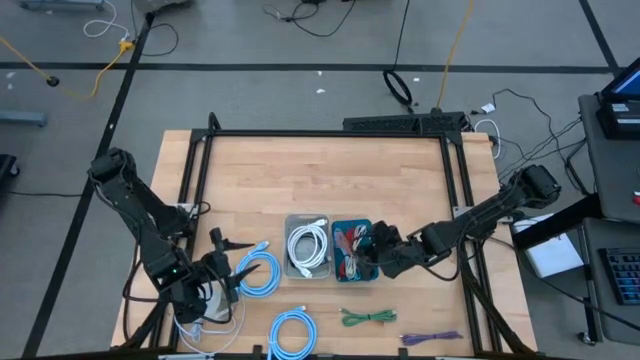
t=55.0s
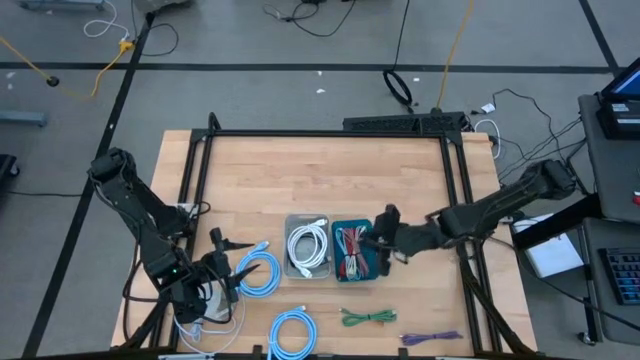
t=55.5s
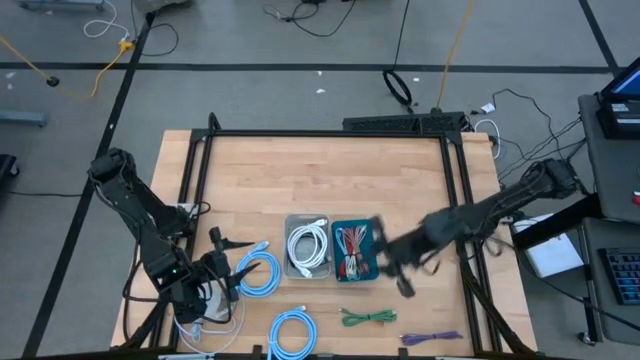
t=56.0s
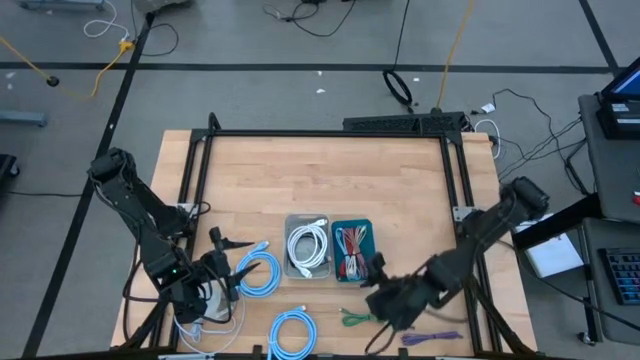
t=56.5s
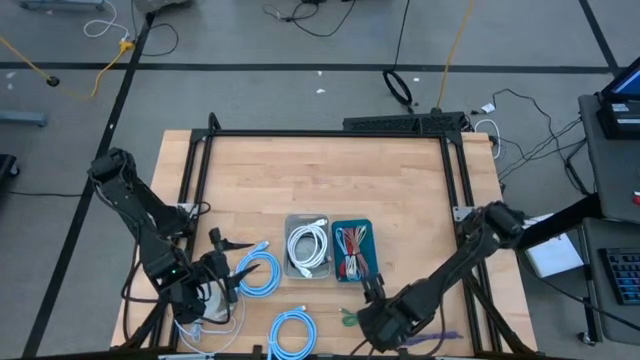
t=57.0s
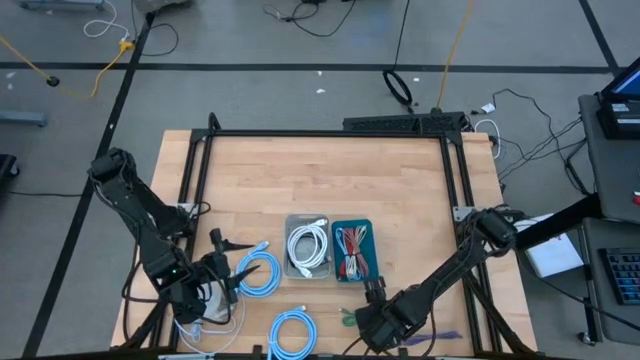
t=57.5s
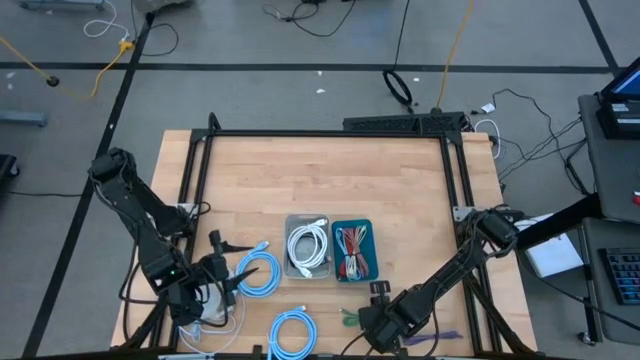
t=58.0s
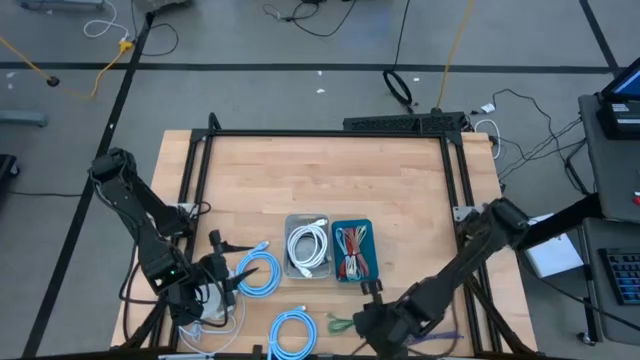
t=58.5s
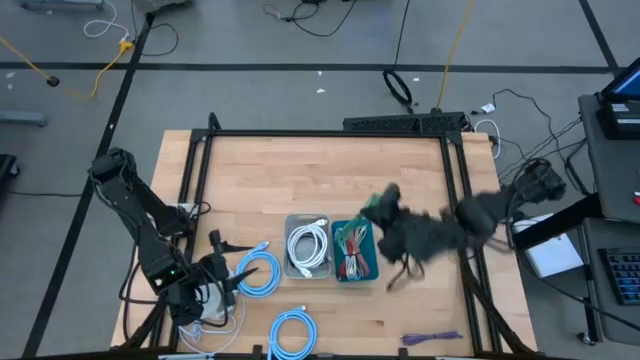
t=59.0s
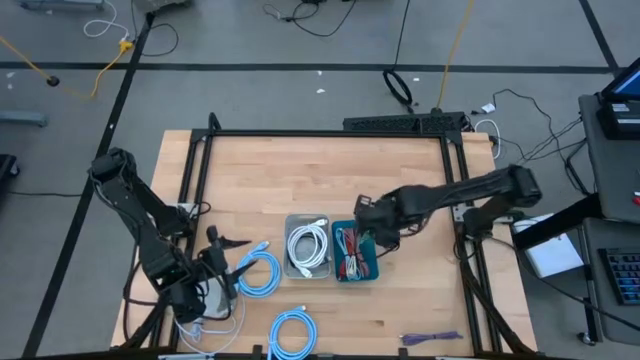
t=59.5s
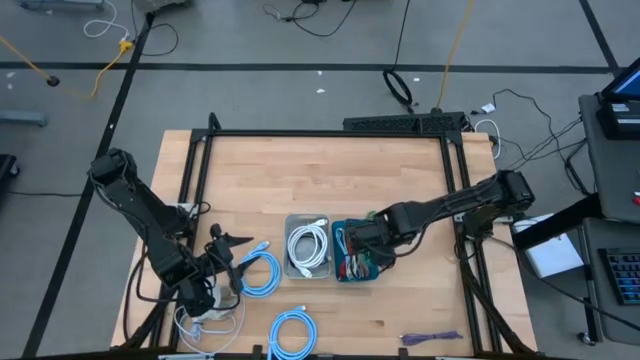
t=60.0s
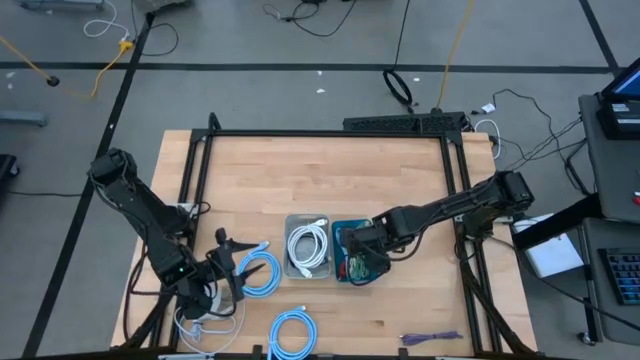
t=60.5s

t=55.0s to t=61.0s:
Task: Pick & Place USB Port
Put the green charger cable into the blue bin

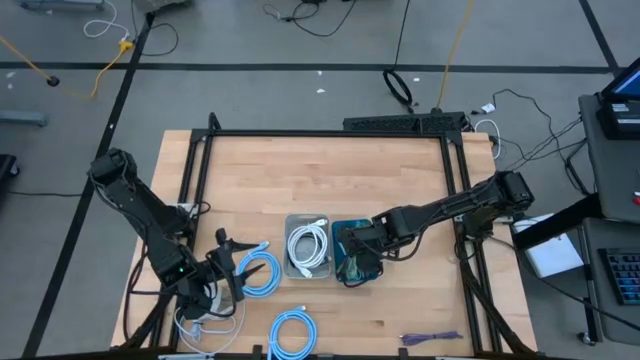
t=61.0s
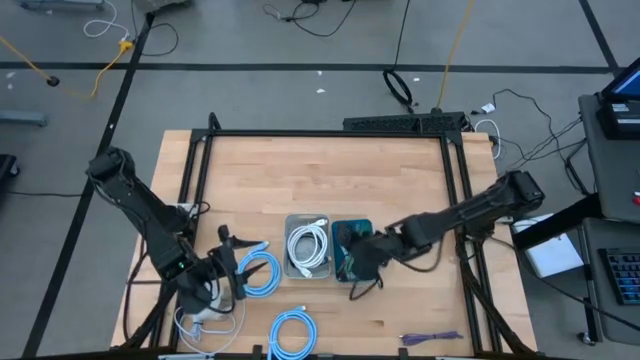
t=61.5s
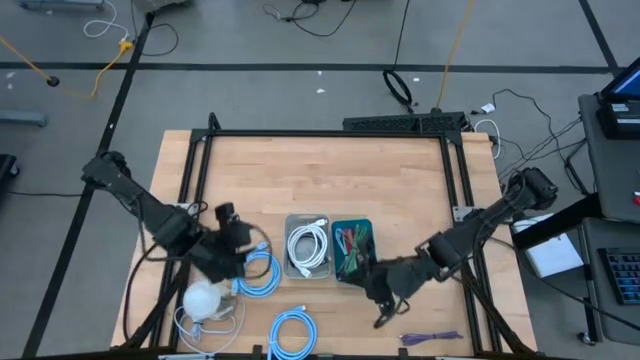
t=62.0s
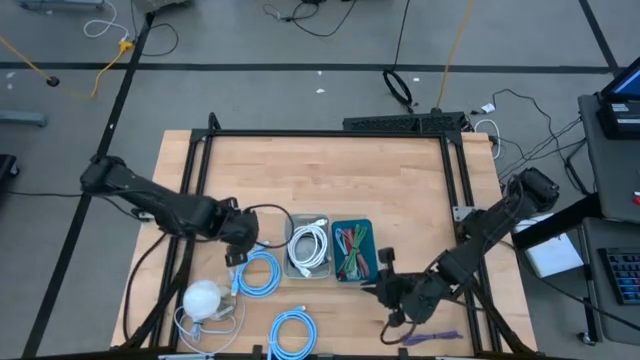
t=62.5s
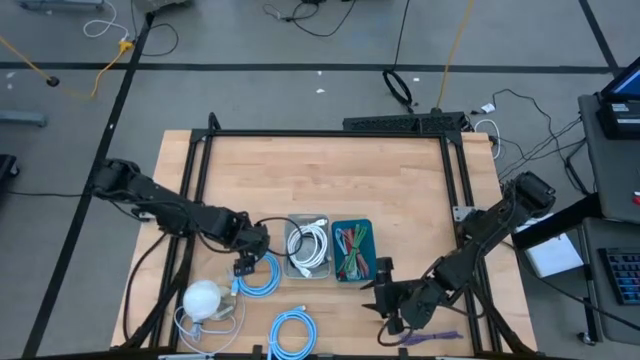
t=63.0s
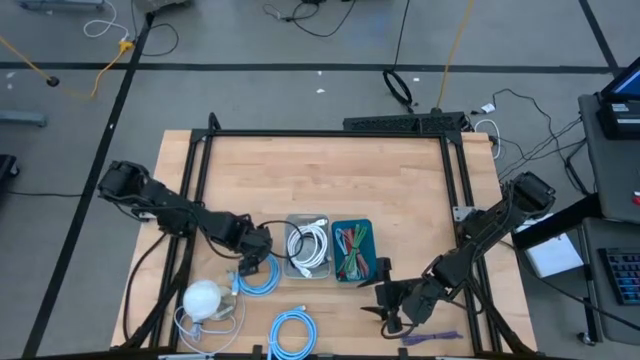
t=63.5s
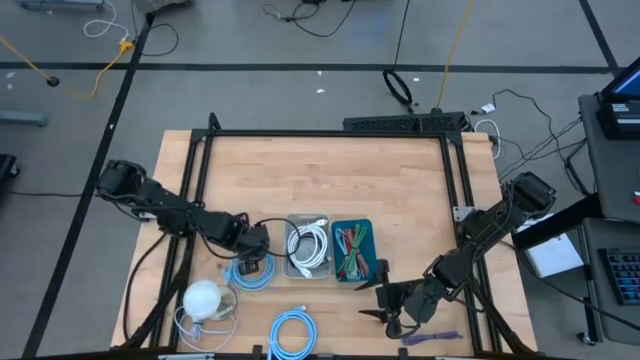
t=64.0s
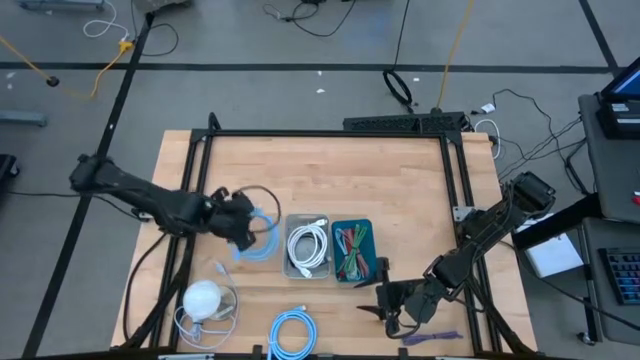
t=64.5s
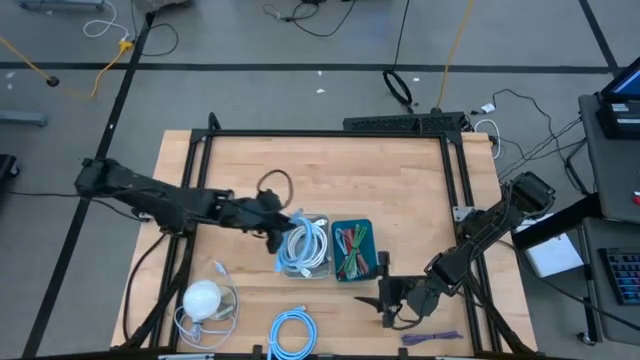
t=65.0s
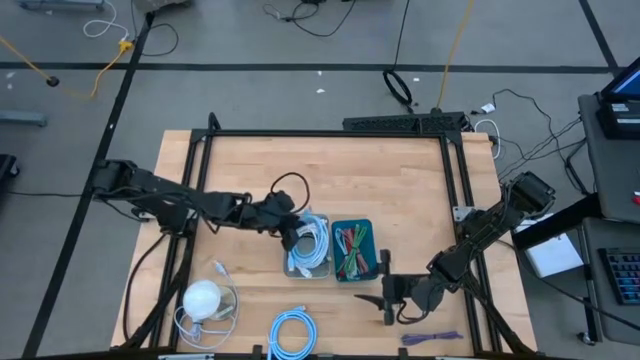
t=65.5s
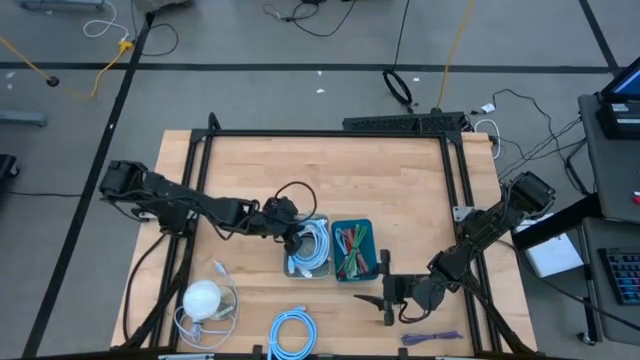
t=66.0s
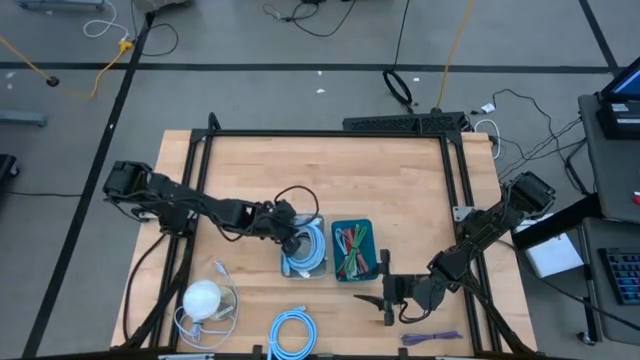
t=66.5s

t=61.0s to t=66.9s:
Put the top blue display cable into the gray bin

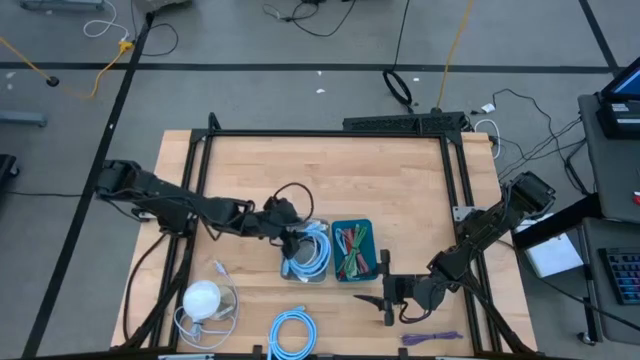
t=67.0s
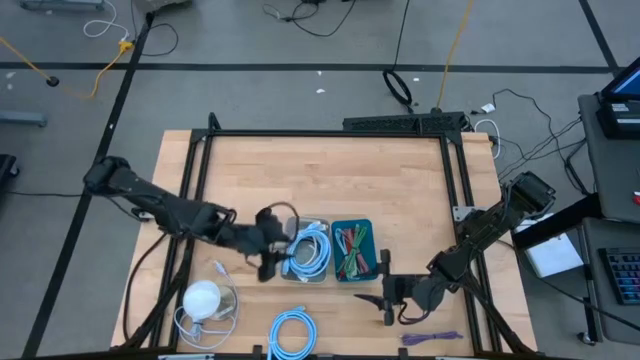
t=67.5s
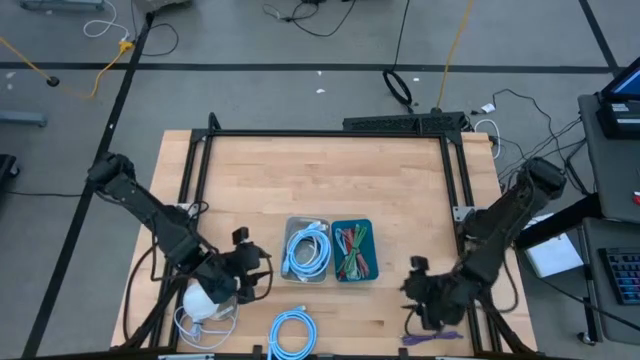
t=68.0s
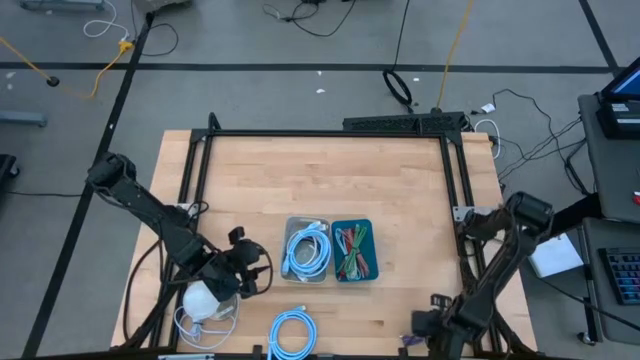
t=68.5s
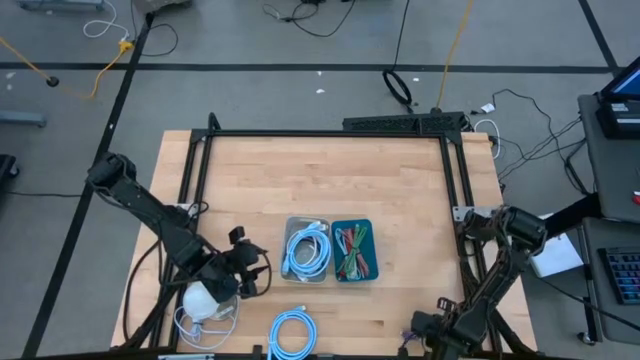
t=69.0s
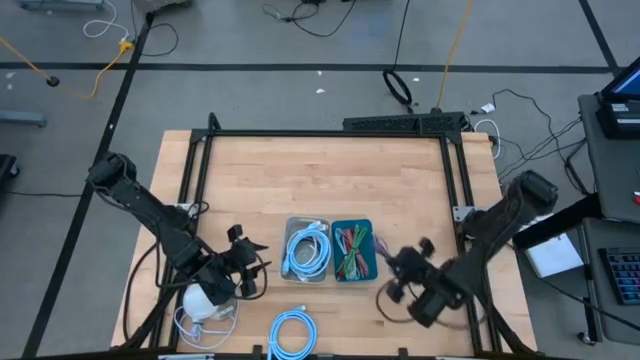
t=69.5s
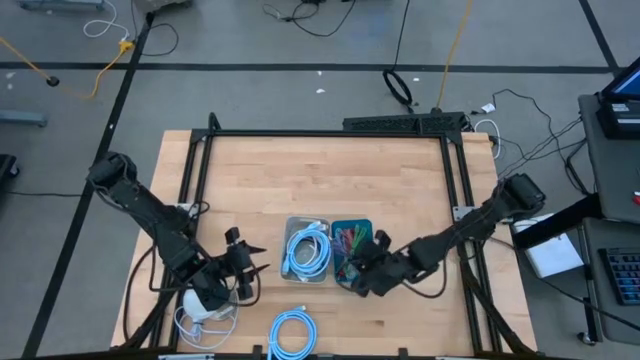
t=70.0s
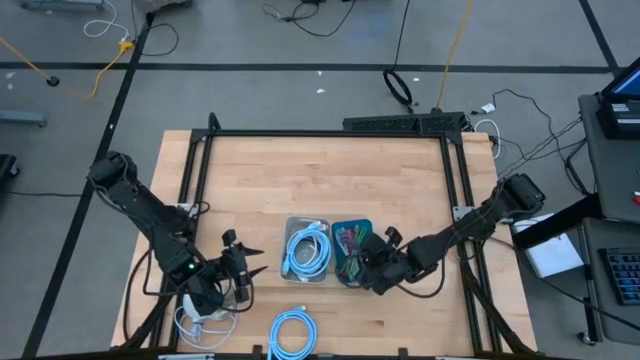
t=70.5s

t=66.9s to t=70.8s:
Put the purple charger cable into the blue bin

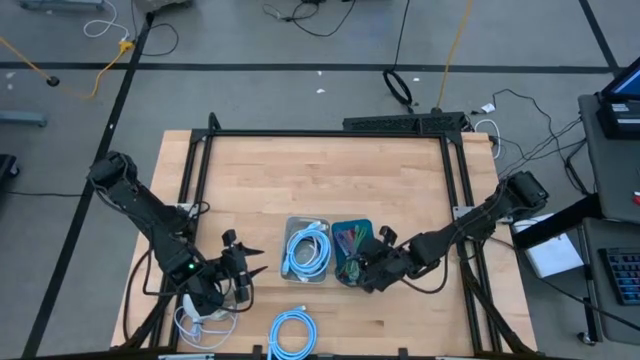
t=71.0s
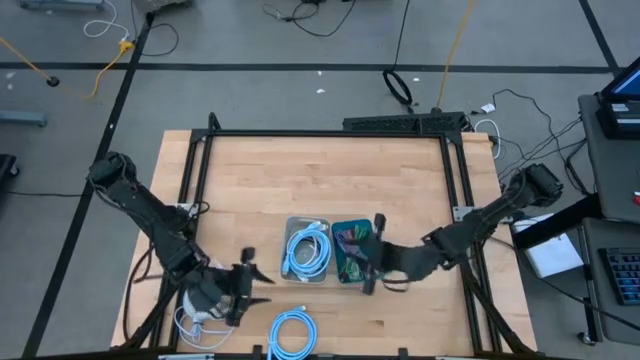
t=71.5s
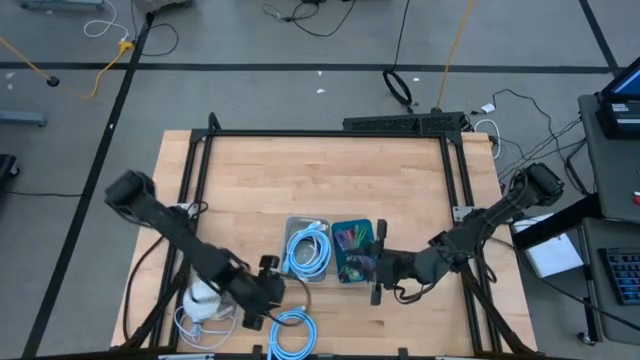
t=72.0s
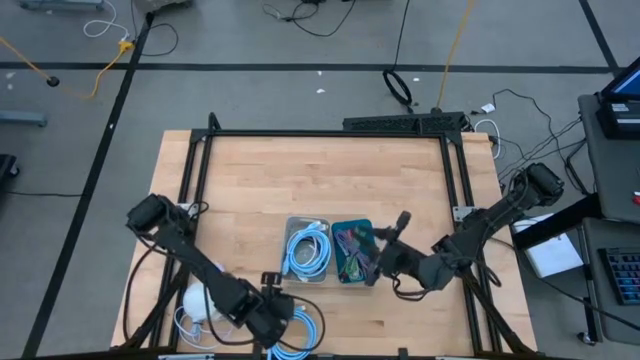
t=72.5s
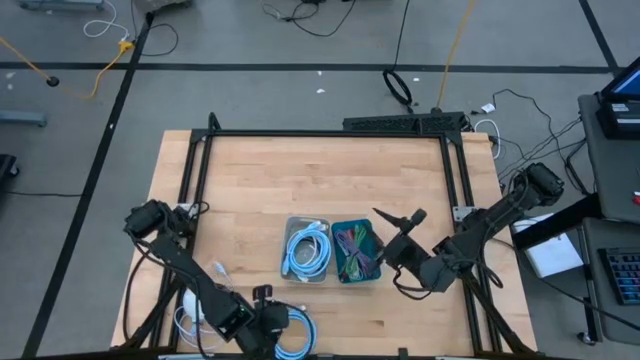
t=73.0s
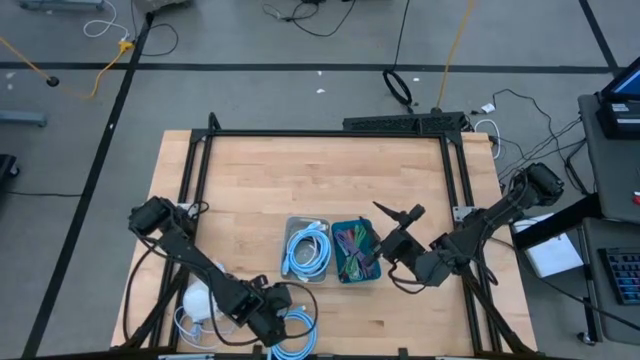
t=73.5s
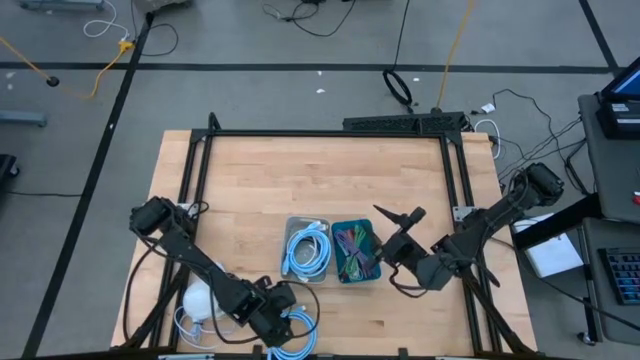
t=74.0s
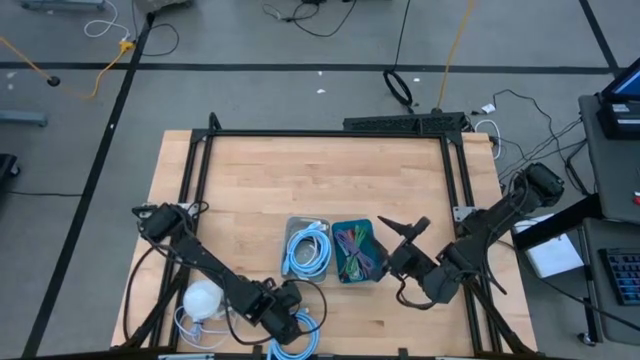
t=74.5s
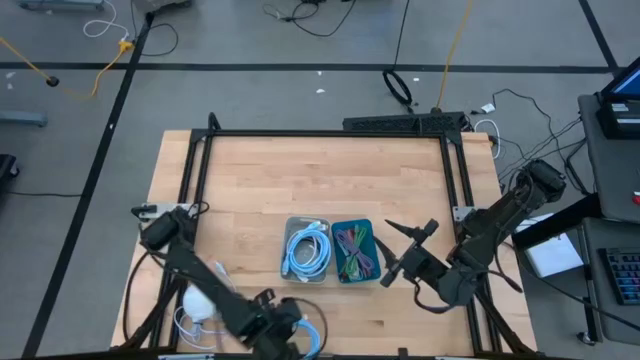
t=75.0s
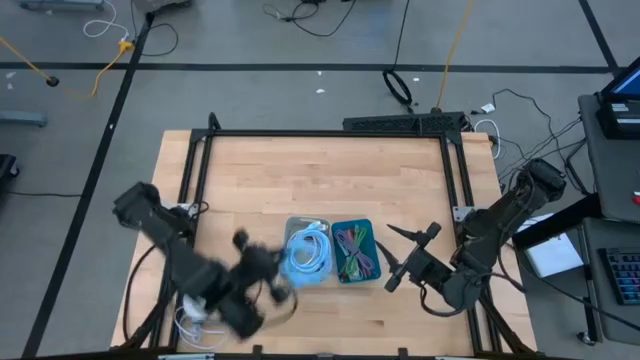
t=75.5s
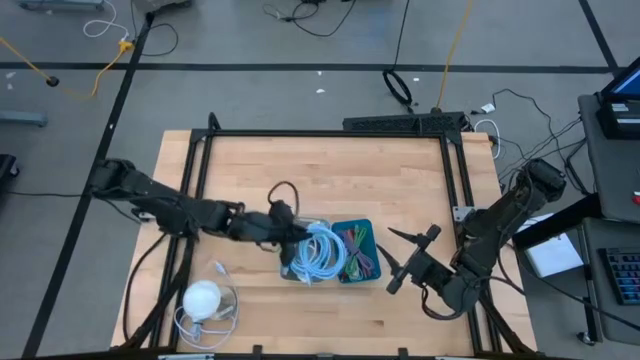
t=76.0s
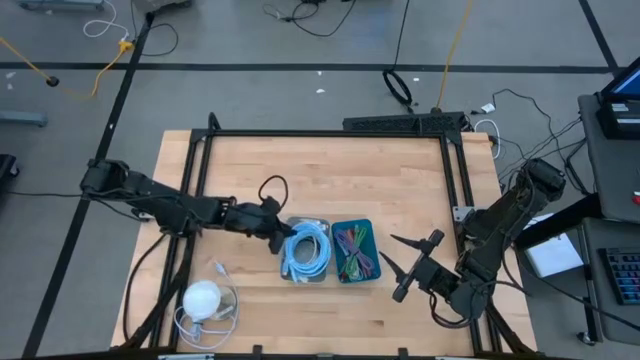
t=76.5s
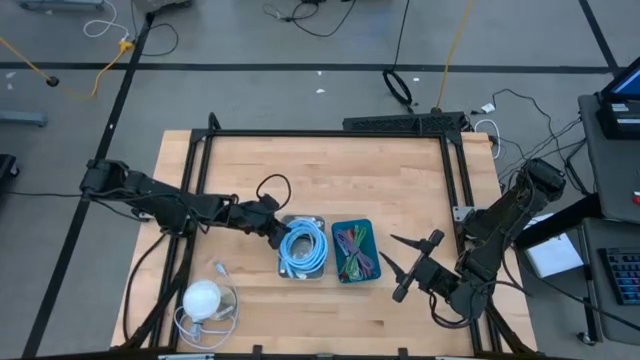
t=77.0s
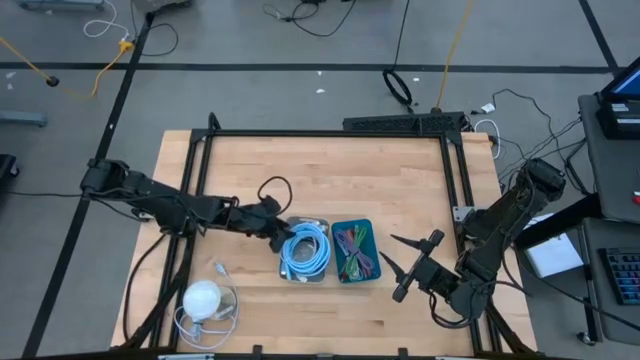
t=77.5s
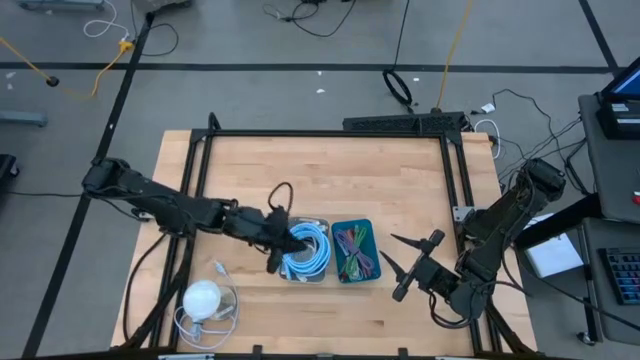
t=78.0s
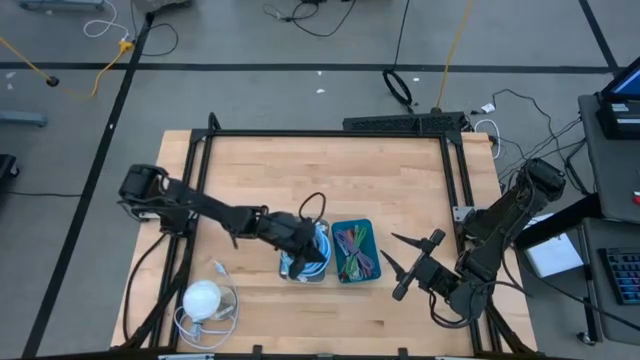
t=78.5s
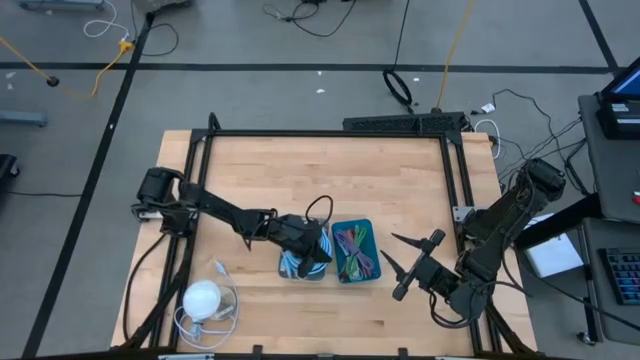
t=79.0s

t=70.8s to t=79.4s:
Put the blue display cable into the gray bin
